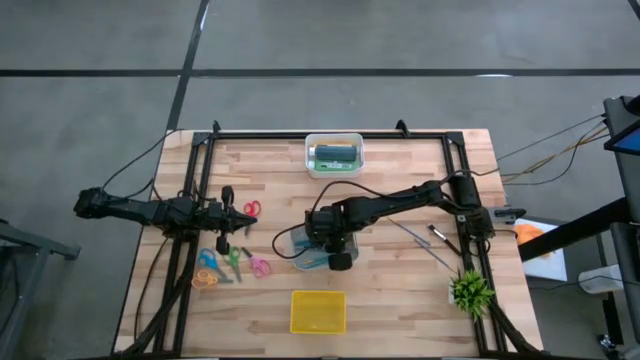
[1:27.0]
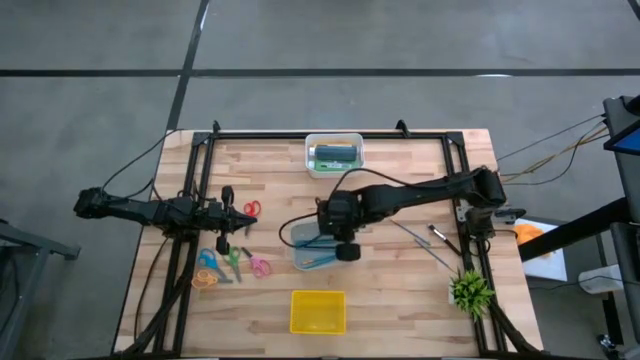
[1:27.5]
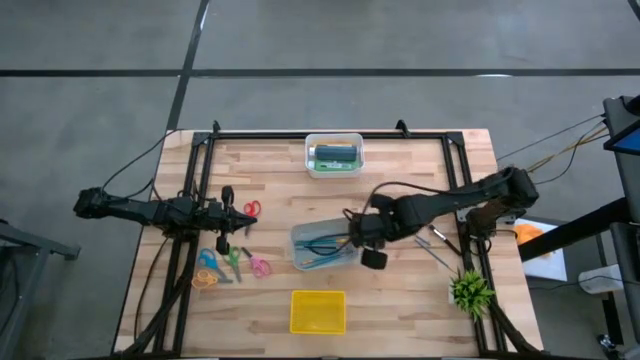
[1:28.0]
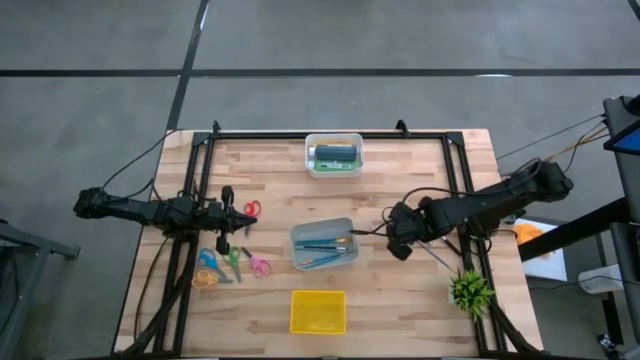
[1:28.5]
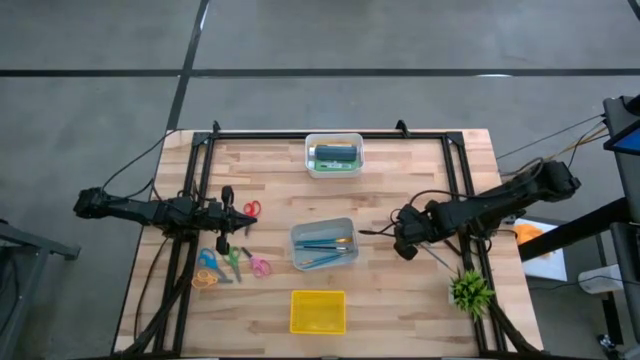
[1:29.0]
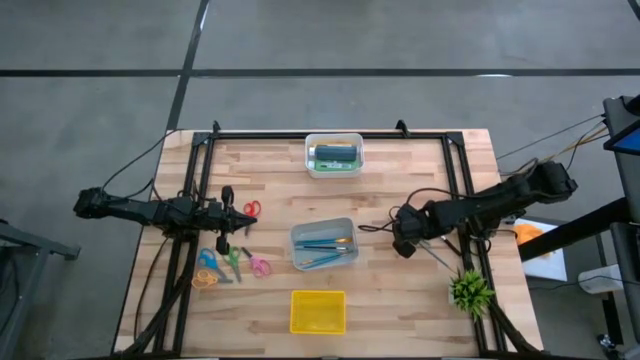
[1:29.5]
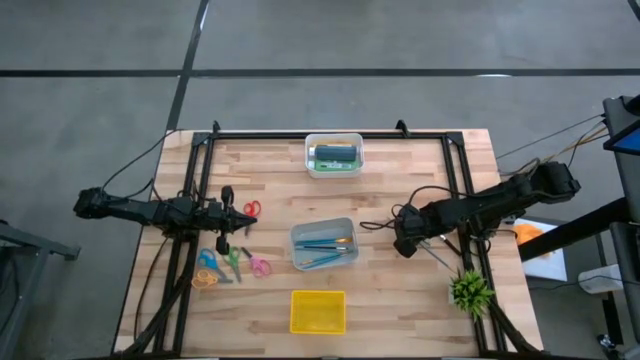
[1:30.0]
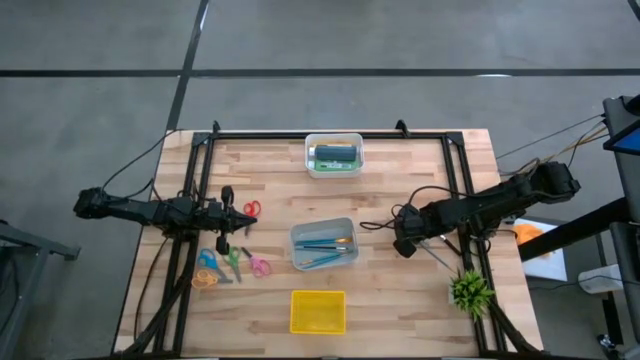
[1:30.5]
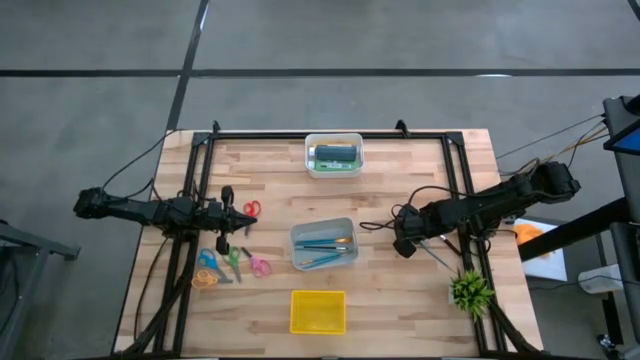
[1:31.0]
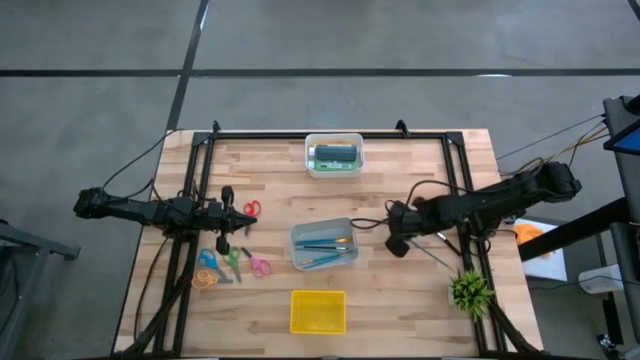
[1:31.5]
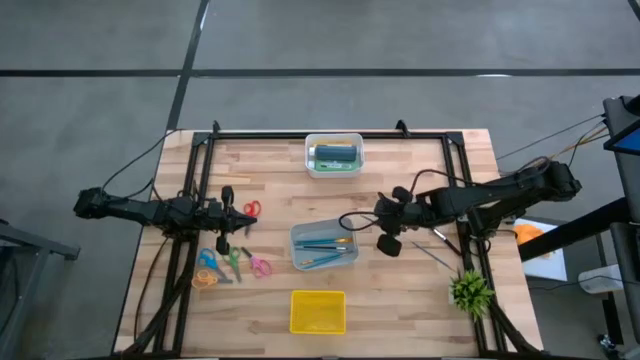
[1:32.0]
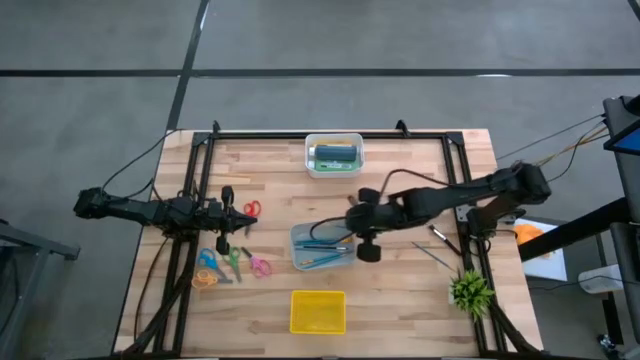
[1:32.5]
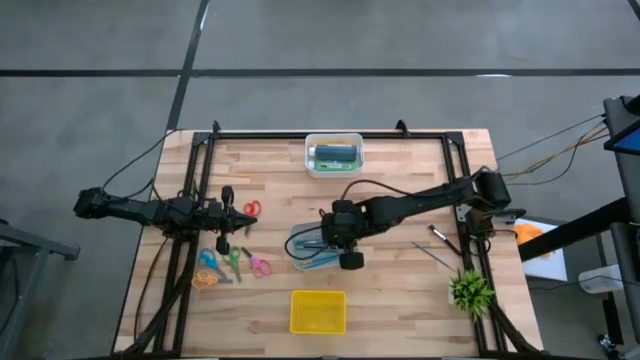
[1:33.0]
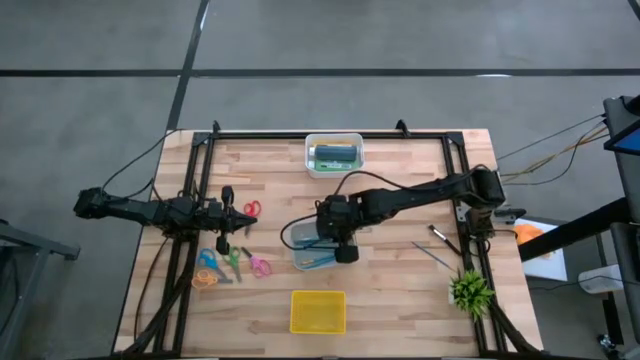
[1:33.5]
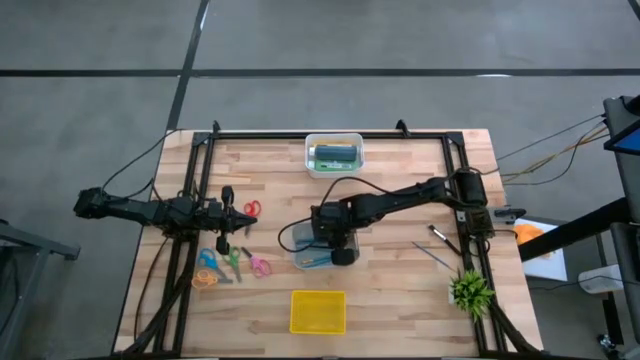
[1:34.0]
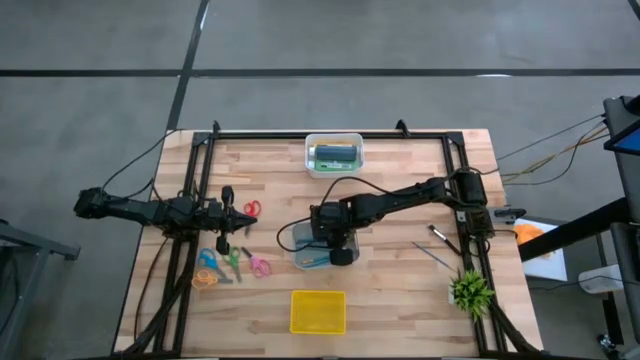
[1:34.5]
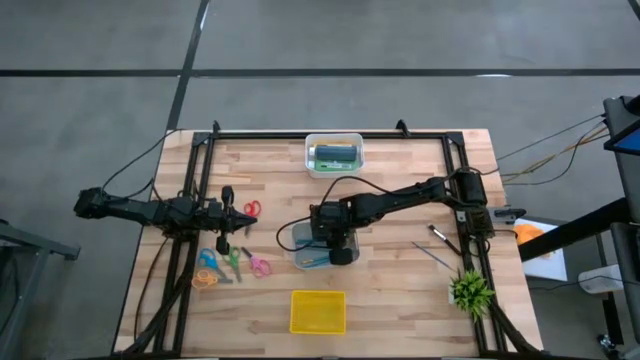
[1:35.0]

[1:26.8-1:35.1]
Task: Pick & Place Paint Supplies
Put the blue paint brush into the gray bin

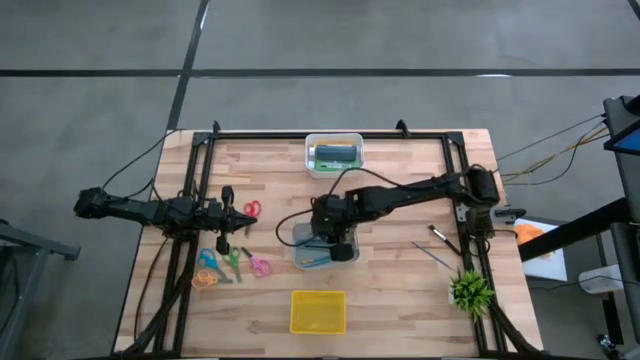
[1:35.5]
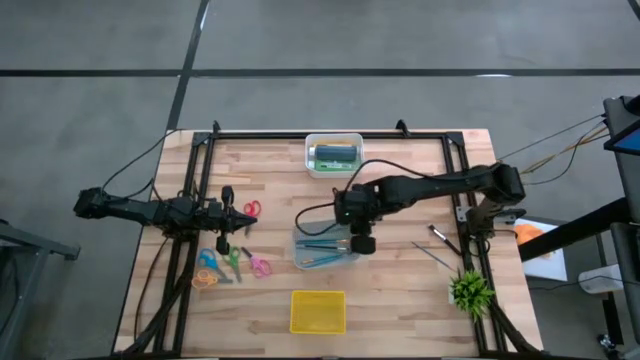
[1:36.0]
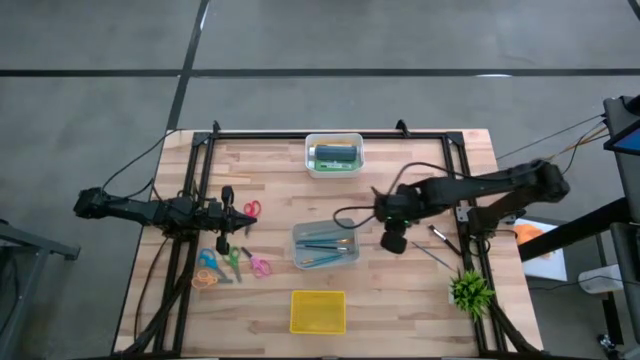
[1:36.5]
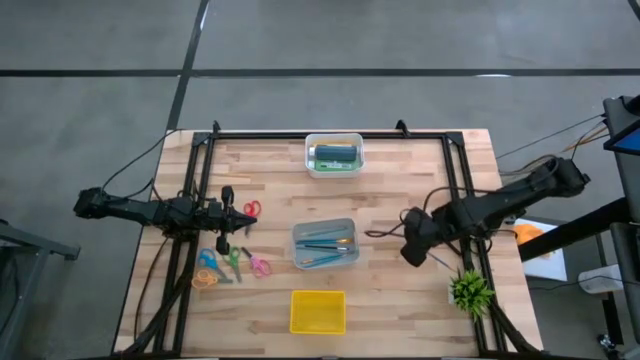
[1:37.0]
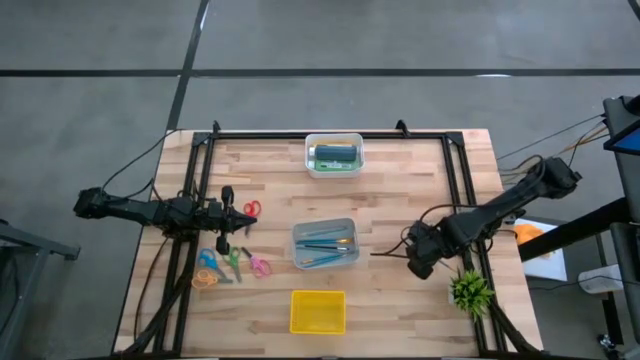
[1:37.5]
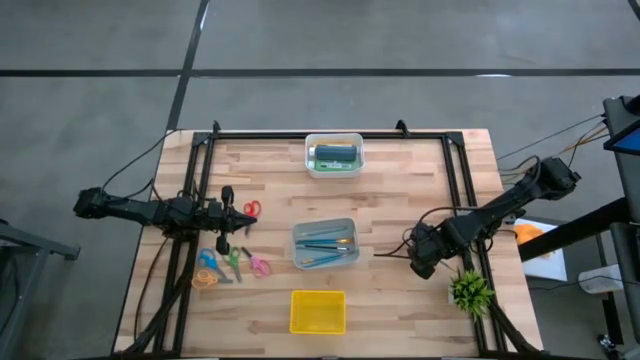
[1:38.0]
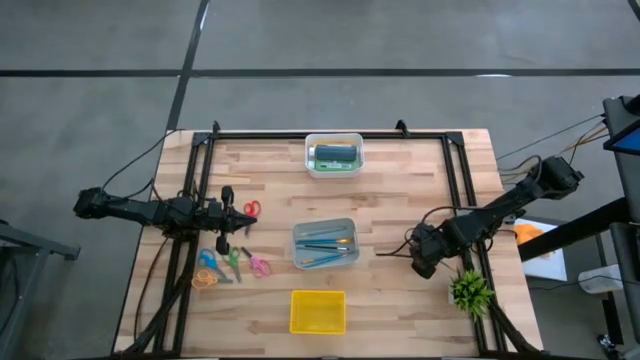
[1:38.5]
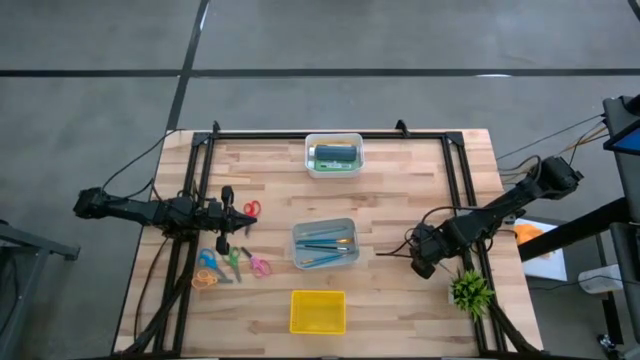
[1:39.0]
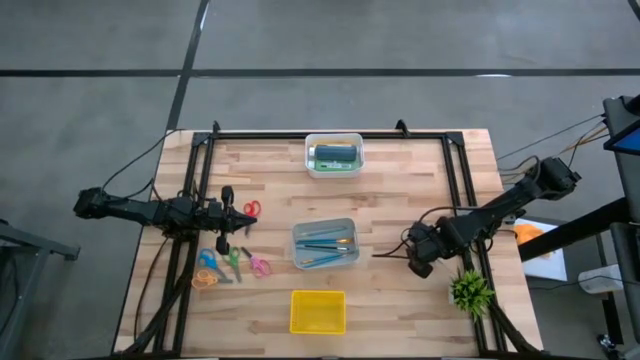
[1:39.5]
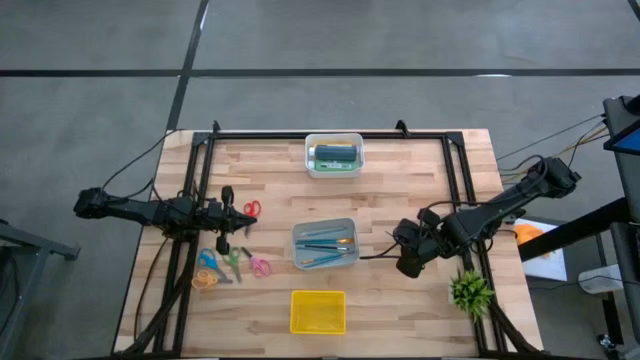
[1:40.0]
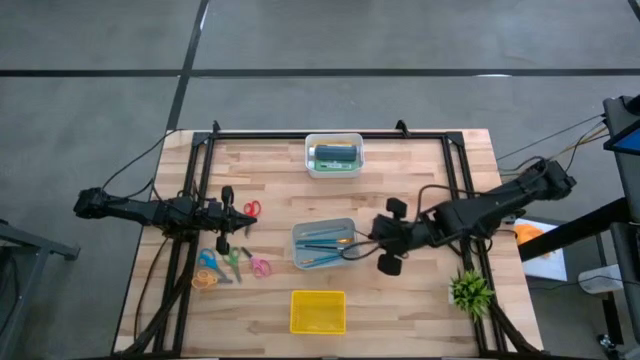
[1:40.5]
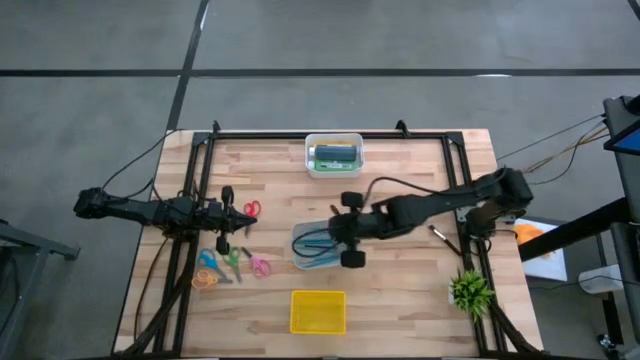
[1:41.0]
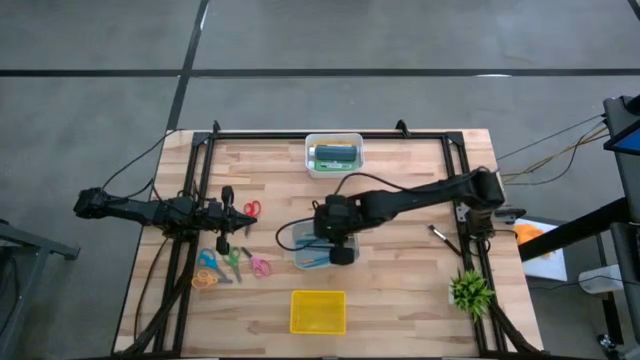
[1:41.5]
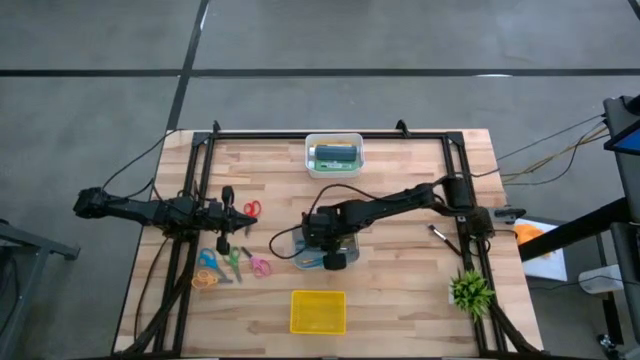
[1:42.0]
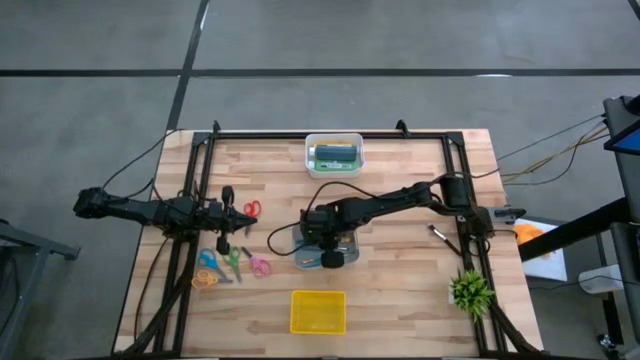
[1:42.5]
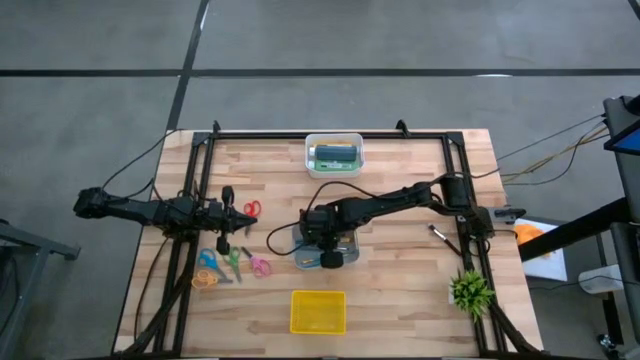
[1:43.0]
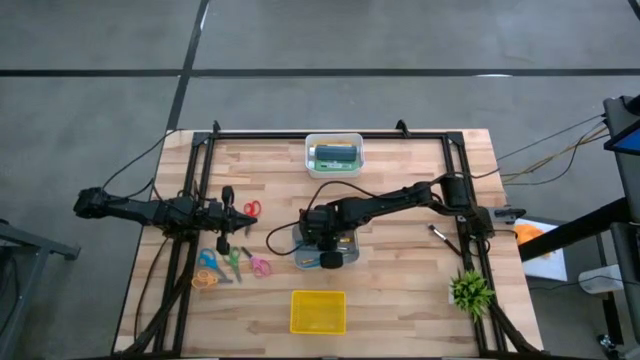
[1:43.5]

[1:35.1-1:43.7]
Put the blue paint brush into the gray bin

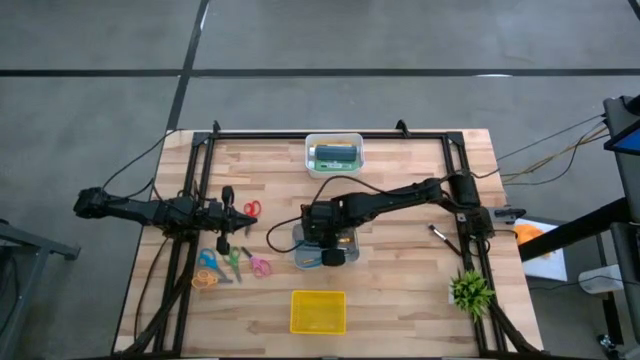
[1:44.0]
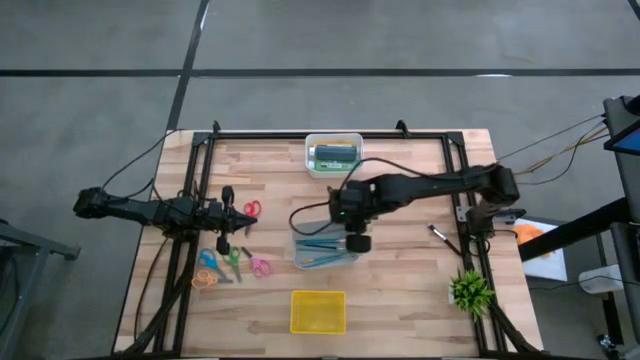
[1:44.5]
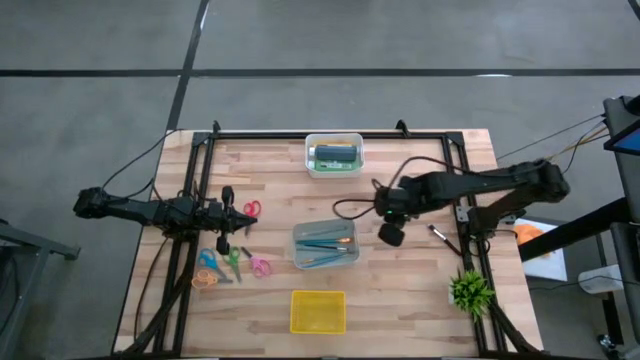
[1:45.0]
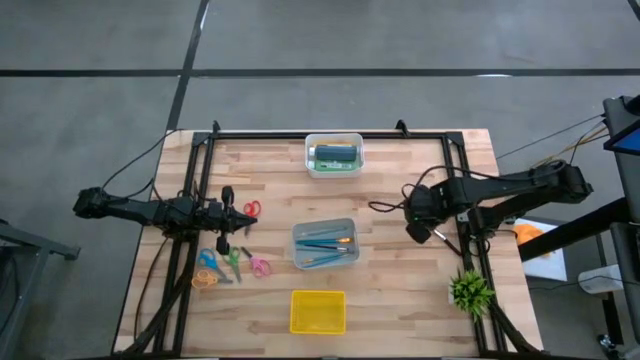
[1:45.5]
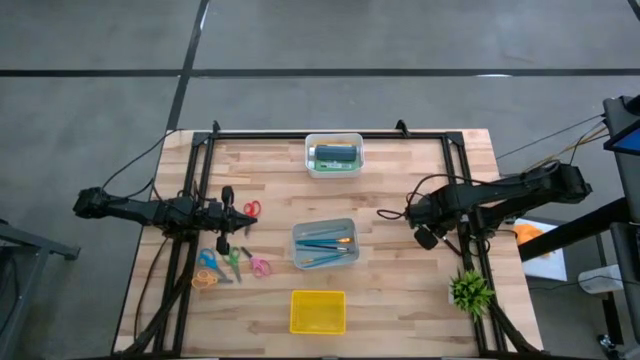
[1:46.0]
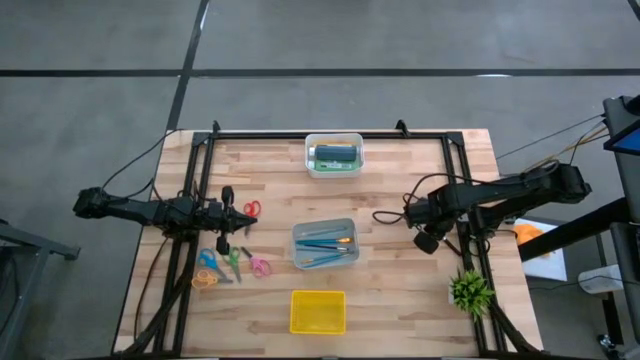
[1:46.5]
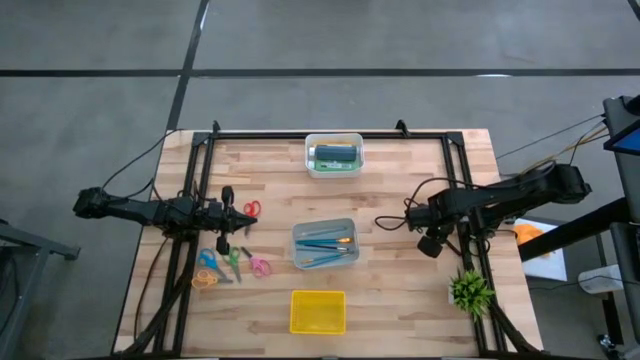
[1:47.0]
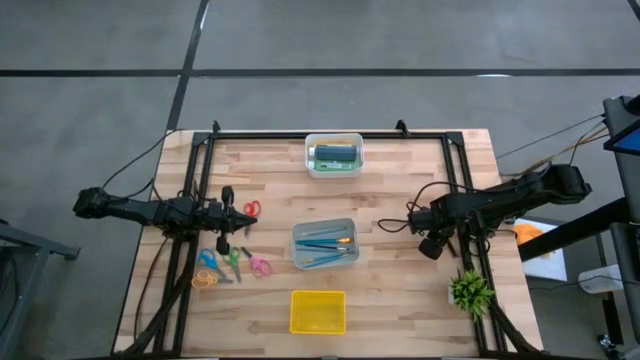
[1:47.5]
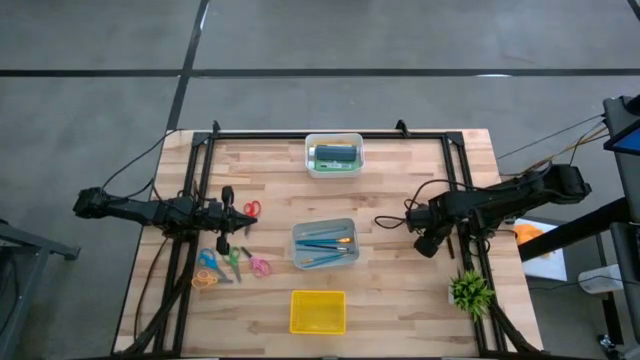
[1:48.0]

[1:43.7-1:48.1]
Put the black paint brush into the gray bin
